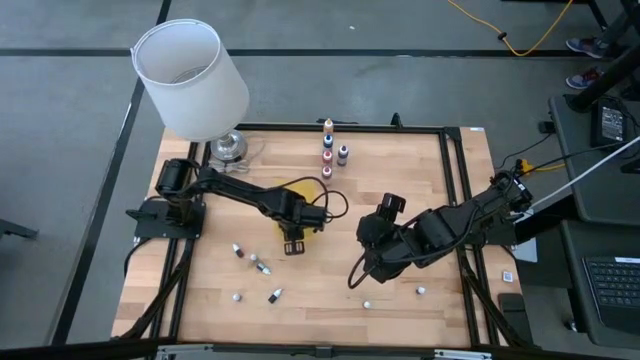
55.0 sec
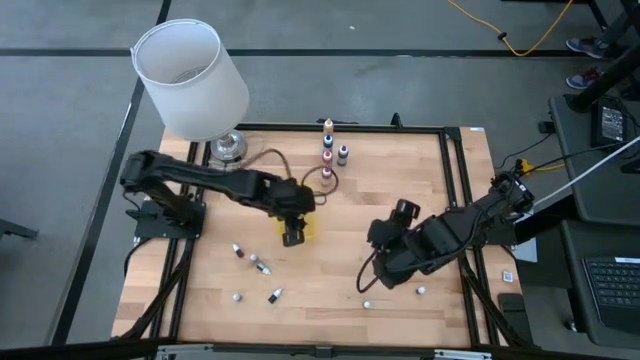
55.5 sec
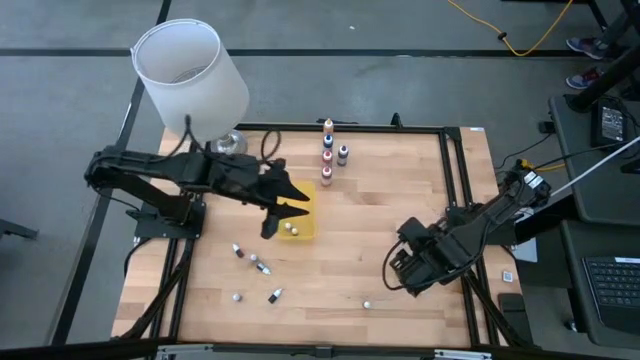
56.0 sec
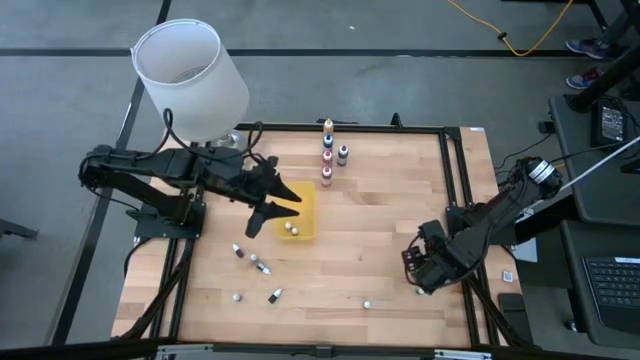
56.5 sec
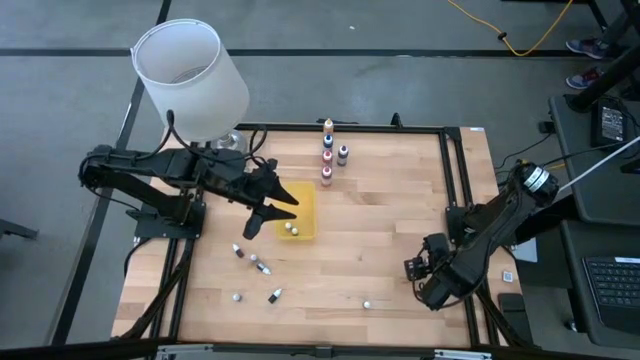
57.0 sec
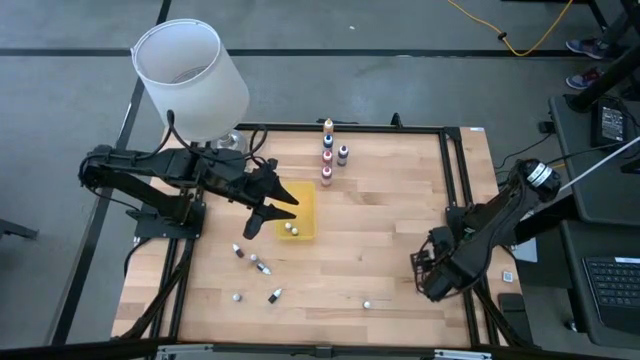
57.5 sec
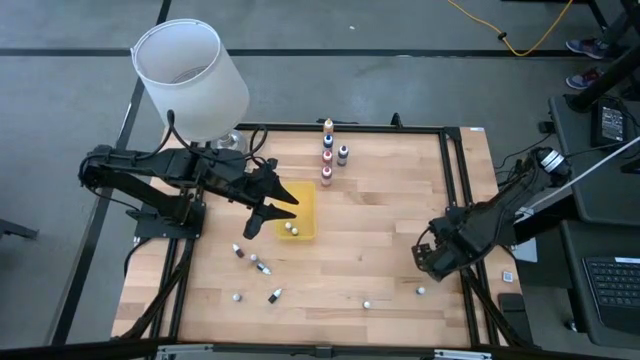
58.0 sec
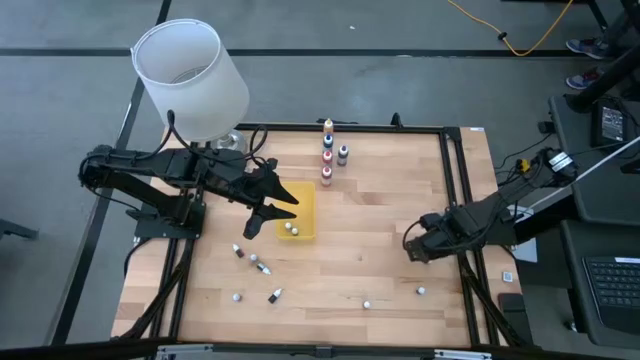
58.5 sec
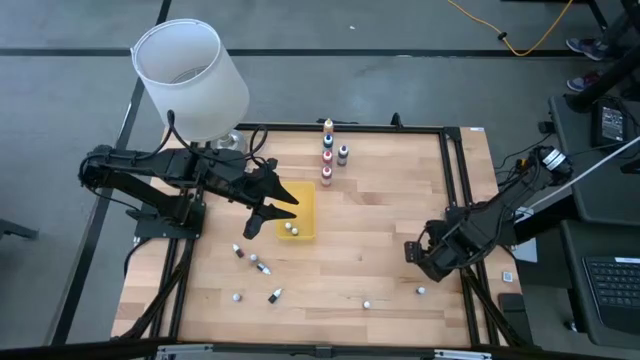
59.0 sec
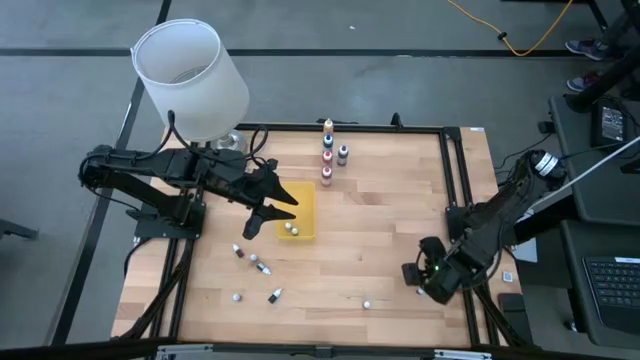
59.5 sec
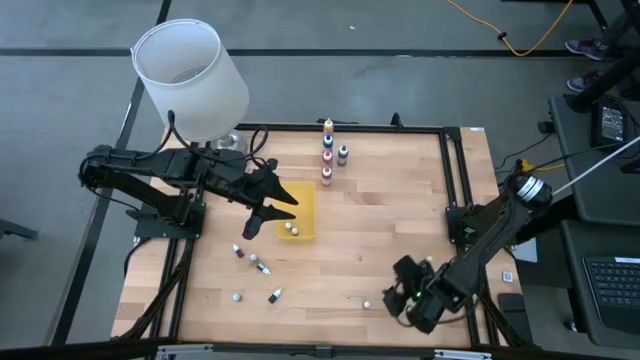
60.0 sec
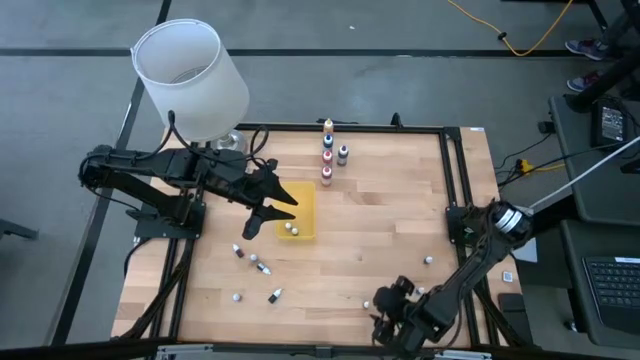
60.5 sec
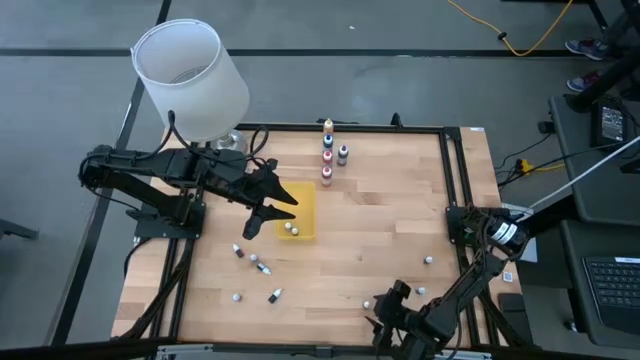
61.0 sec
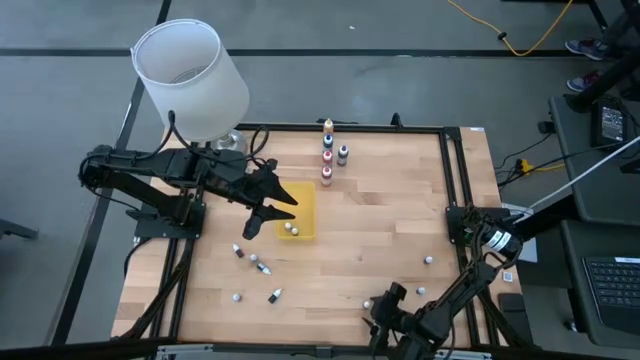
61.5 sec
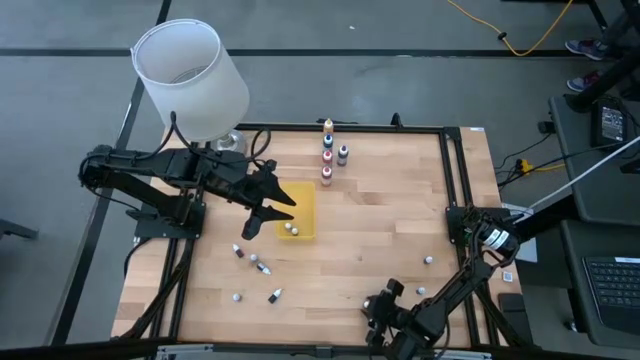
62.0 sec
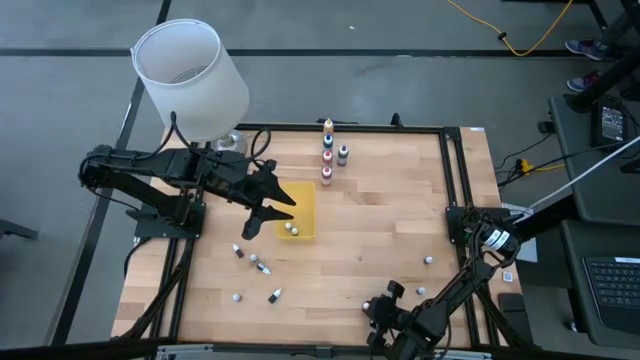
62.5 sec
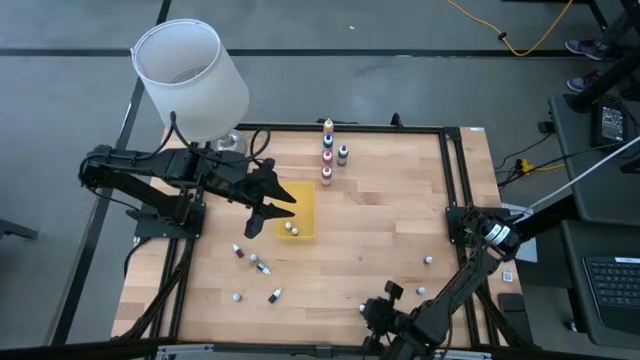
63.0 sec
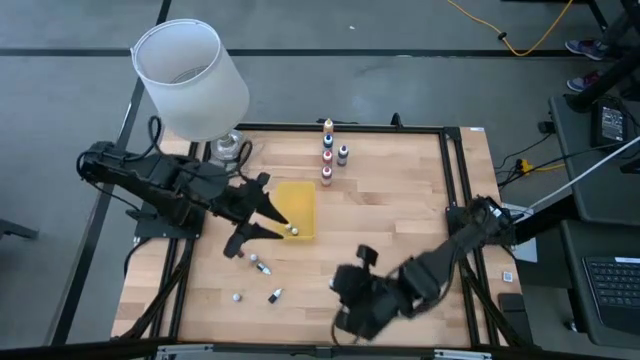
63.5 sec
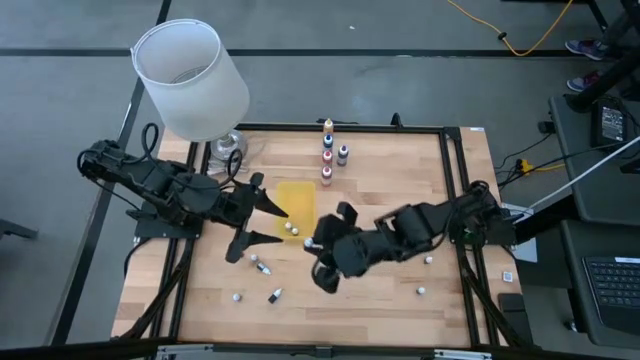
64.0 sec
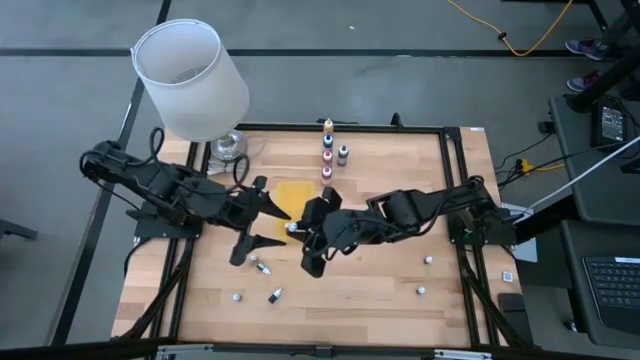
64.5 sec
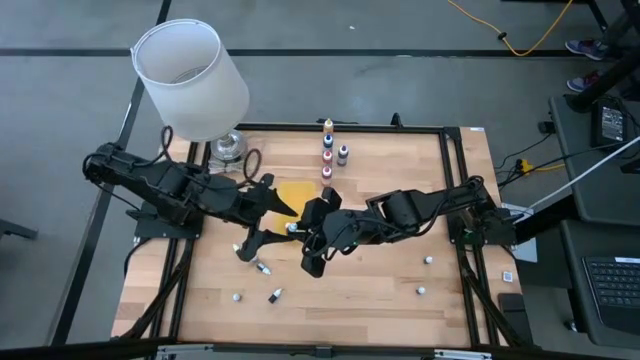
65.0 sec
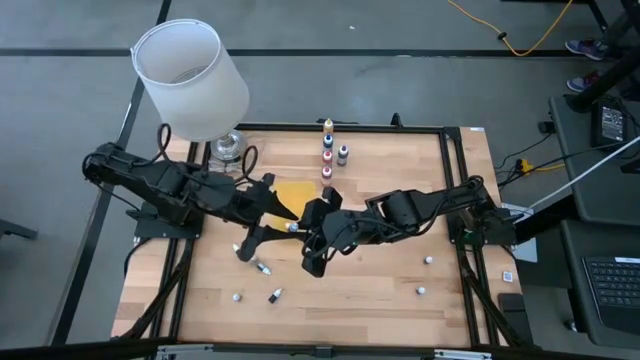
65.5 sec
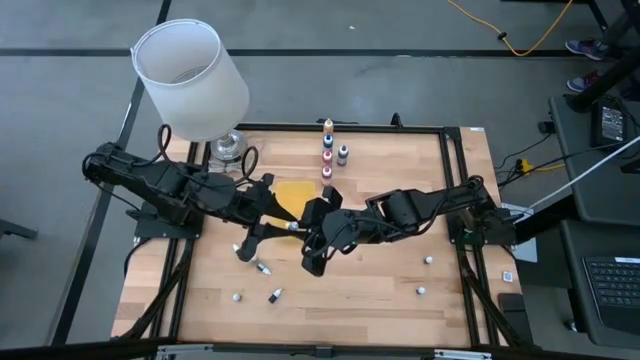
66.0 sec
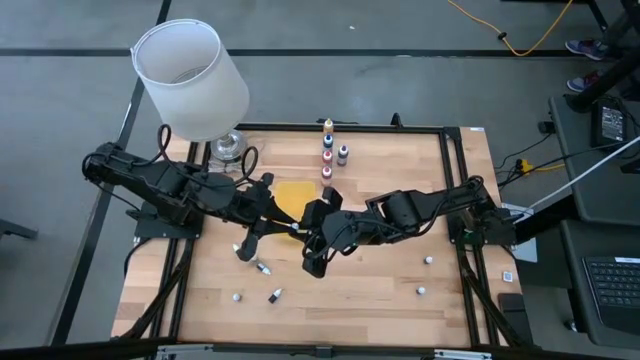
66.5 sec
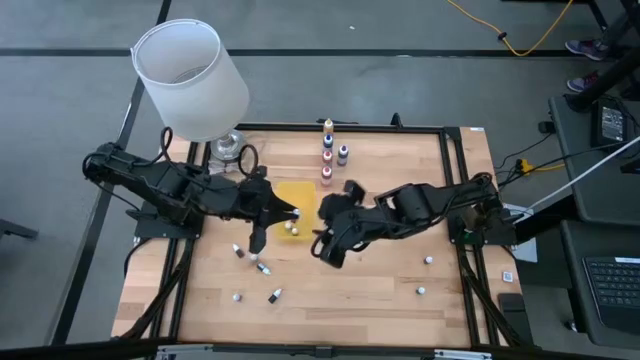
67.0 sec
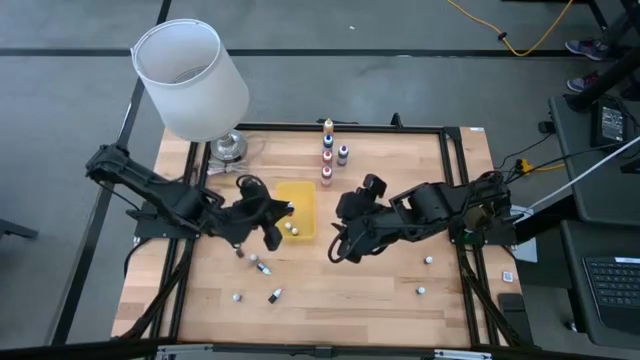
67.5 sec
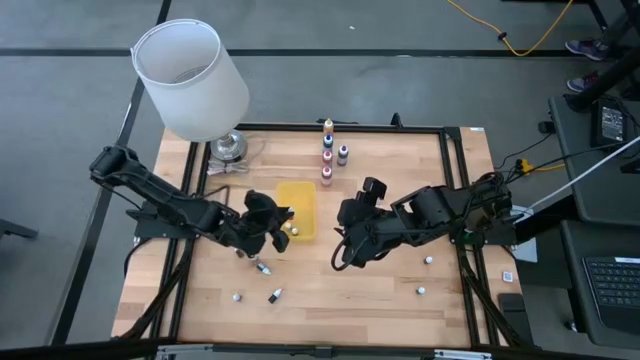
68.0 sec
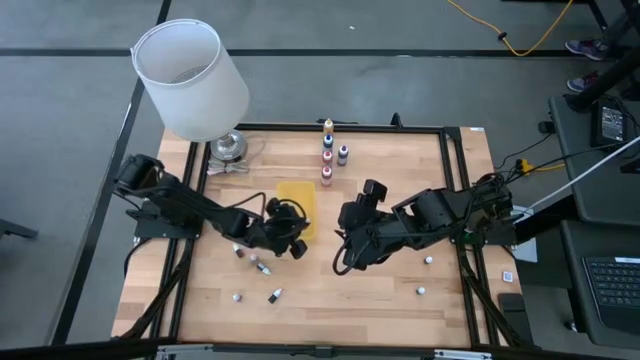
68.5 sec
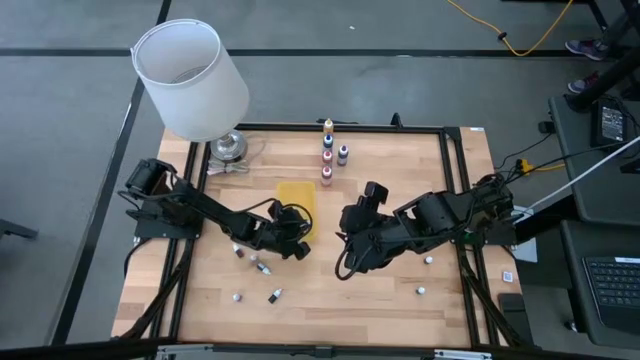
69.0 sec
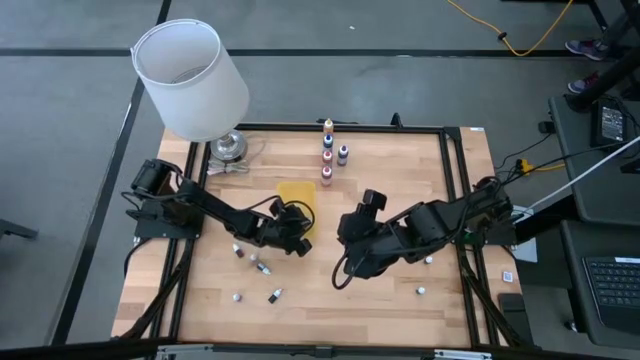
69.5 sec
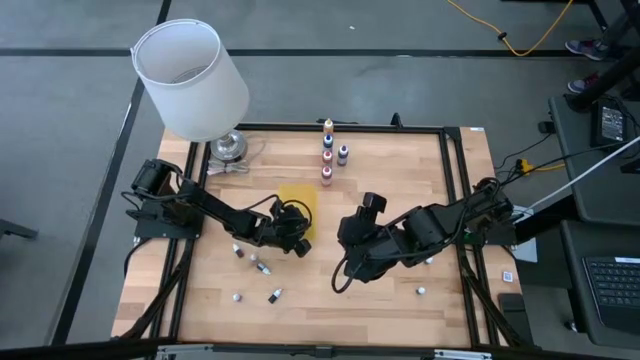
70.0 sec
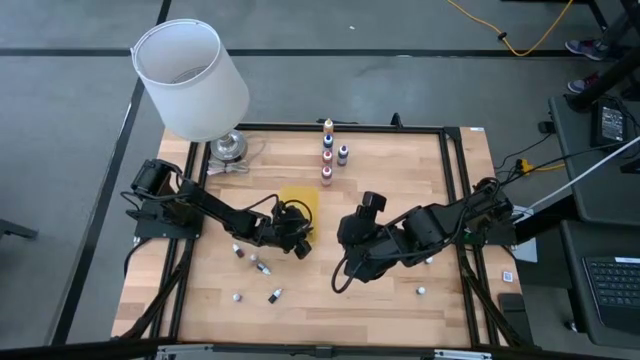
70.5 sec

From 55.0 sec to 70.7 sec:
Task: Pick & Place food coloring
Put the small red bottle into the yellow bin
